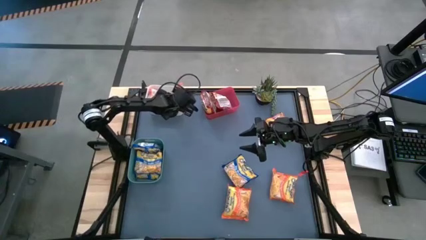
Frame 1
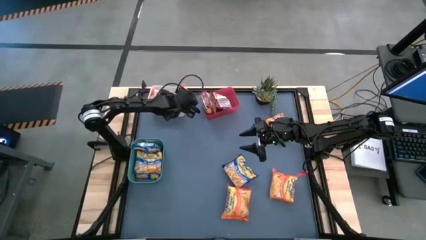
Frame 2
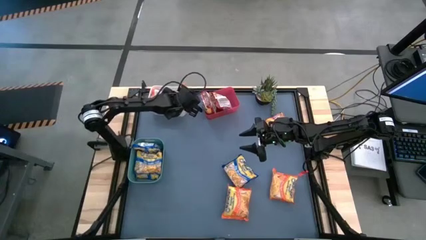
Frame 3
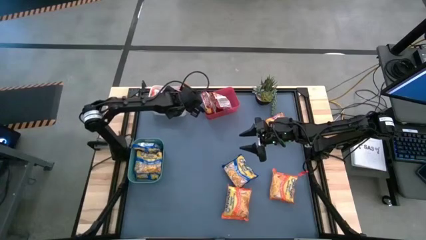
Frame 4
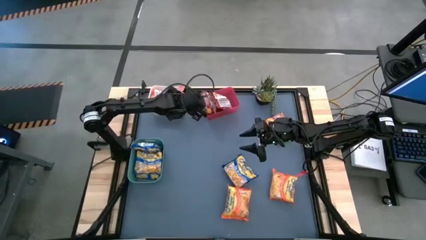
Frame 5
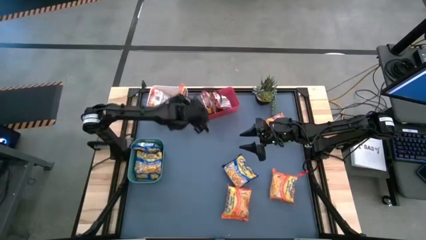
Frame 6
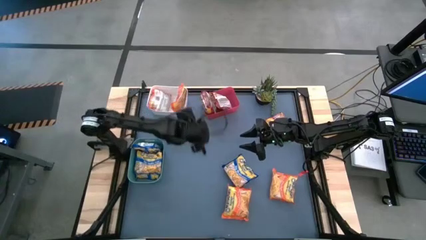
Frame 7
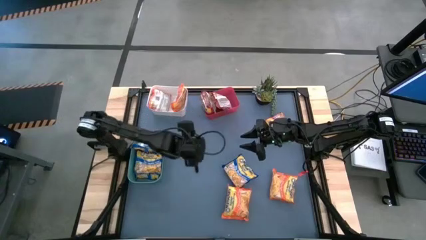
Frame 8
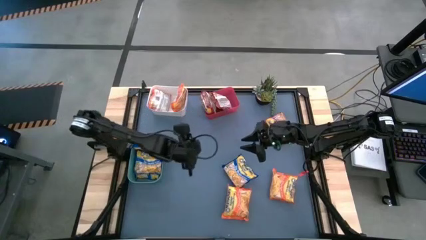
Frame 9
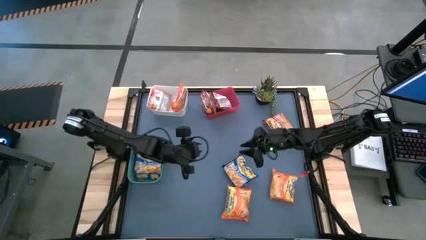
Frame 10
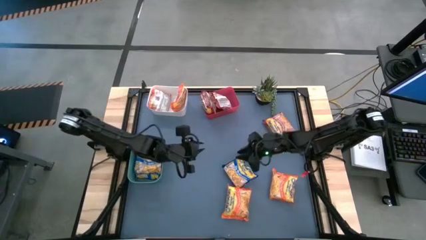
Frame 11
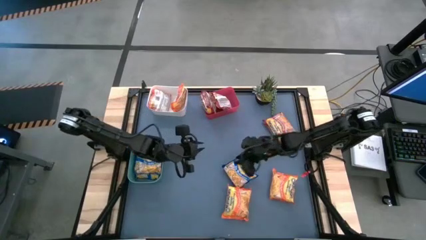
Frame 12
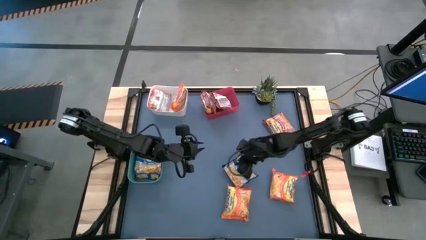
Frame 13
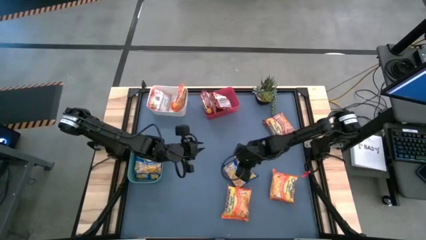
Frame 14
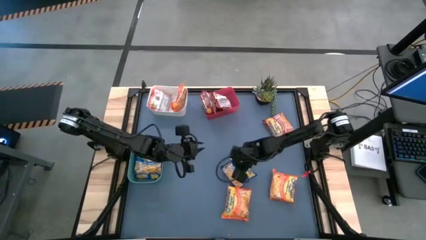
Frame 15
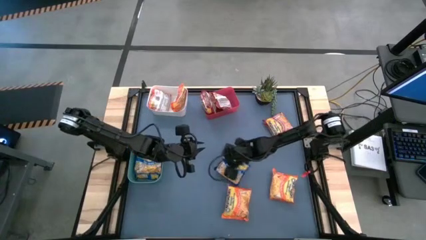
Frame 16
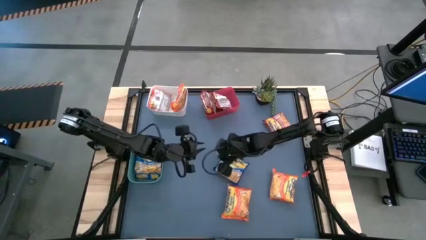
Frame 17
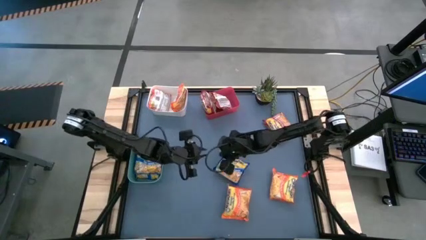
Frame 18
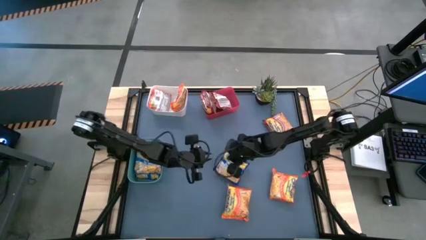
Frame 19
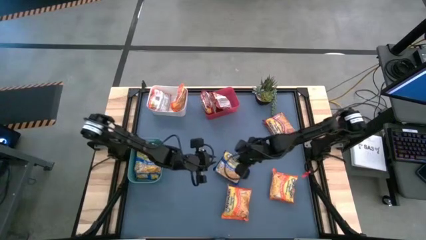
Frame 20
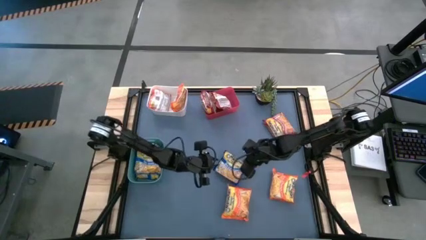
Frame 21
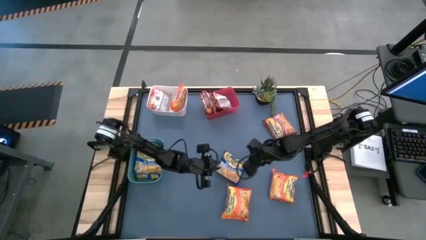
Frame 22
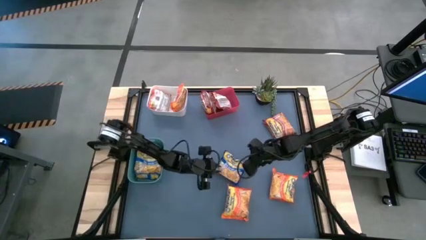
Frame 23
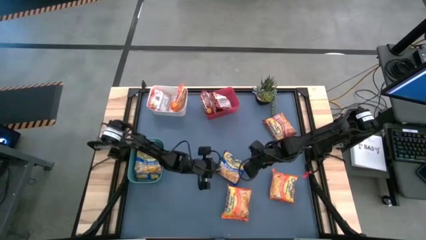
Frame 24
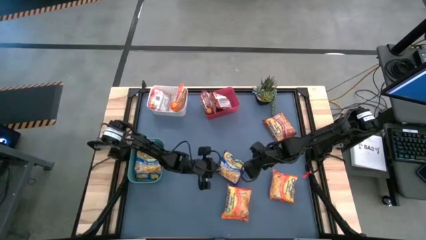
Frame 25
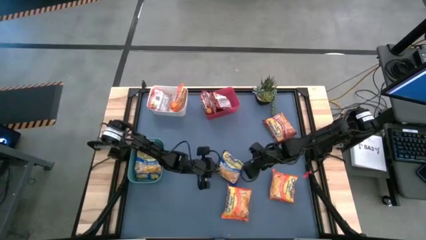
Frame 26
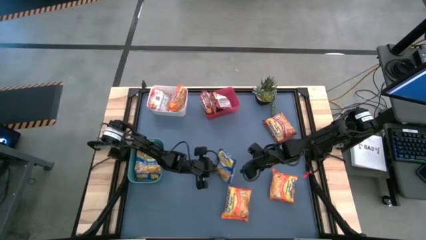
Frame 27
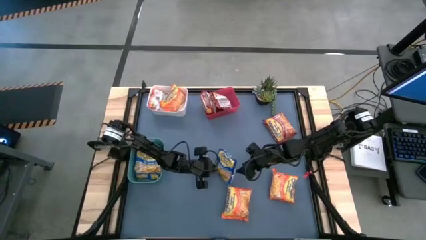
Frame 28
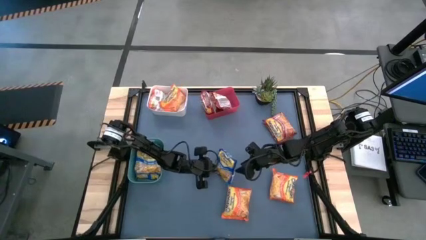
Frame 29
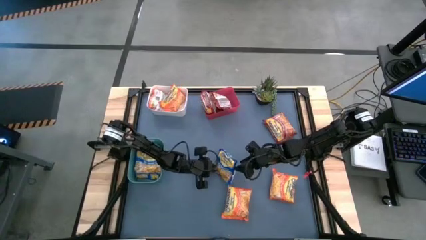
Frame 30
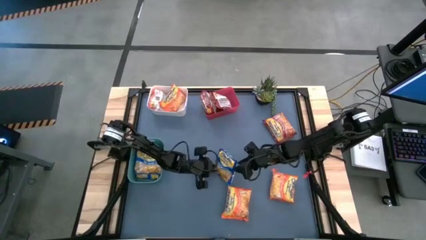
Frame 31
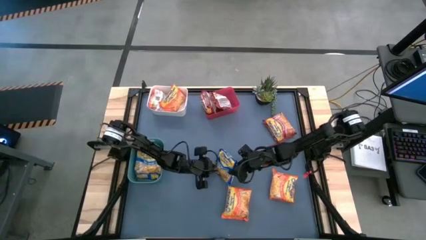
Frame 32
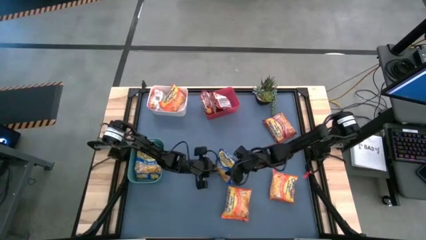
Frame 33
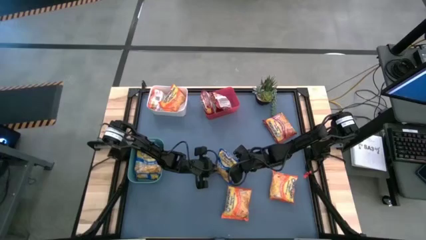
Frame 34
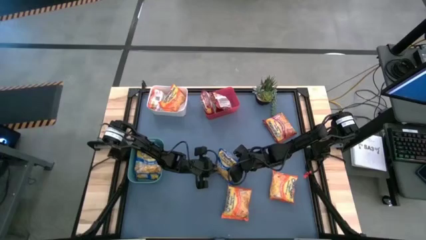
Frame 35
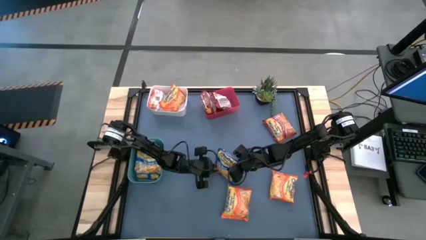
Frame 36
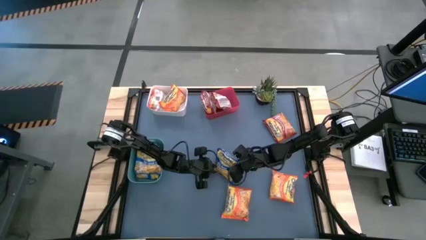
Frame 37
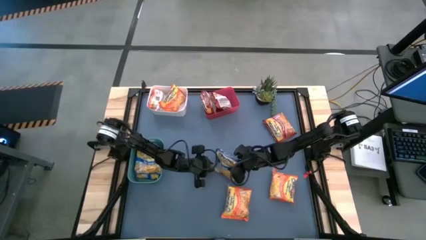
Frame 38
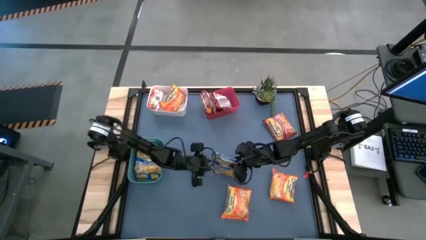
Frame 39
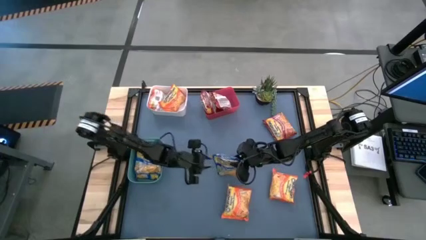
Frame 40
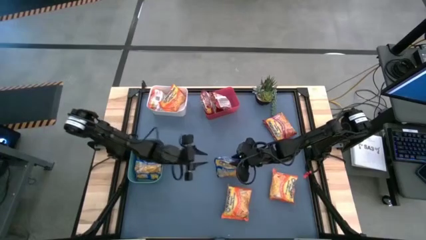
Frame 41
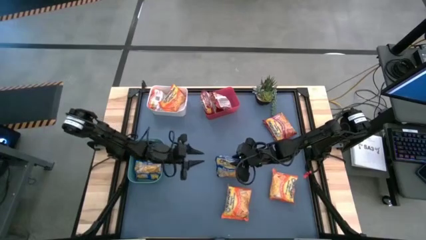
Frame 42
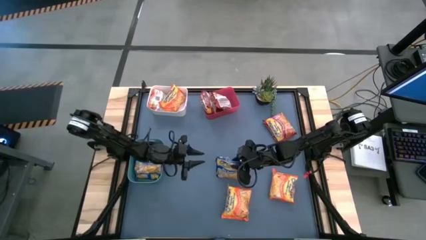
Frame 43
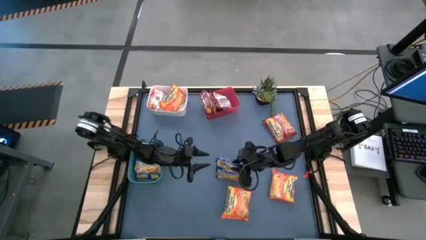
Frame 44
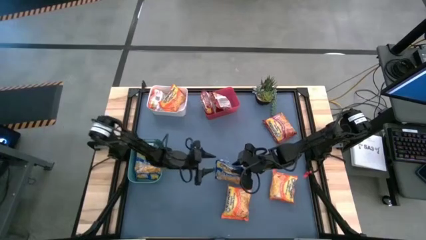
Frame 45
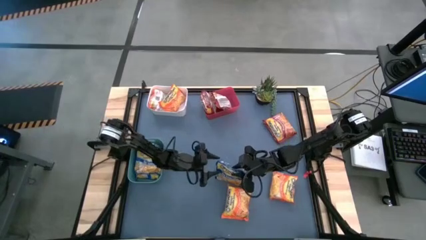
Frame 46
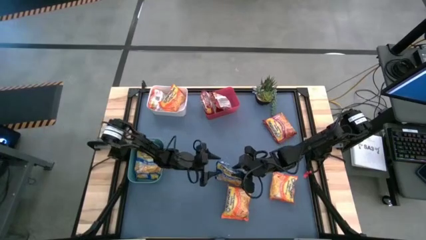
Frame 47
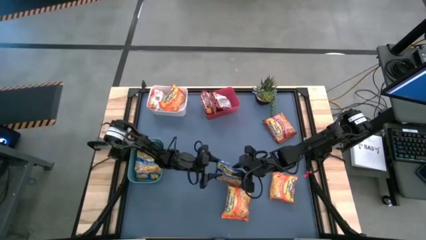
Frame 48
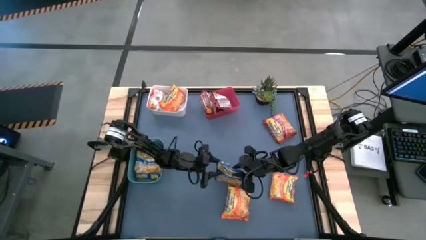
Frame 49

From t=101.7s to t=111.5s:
Task: Sort Maruchan noodles
Put the blue noodle pack into the green bin

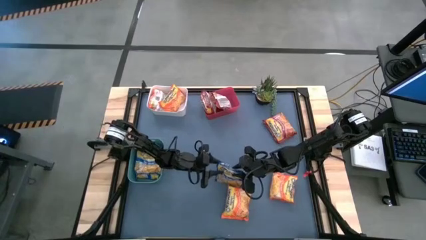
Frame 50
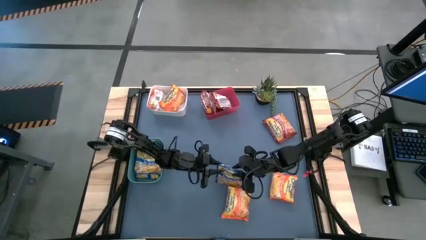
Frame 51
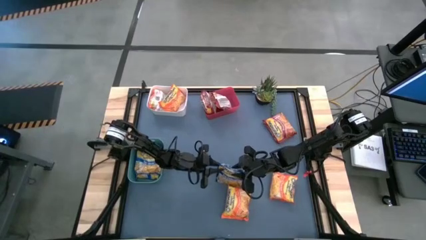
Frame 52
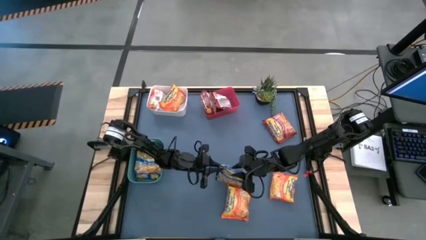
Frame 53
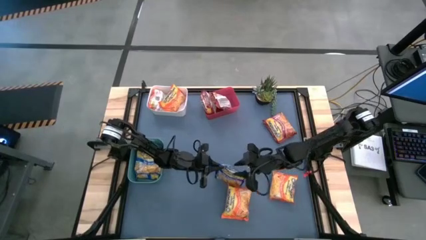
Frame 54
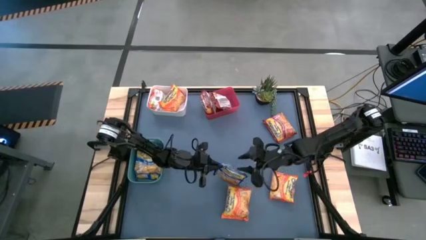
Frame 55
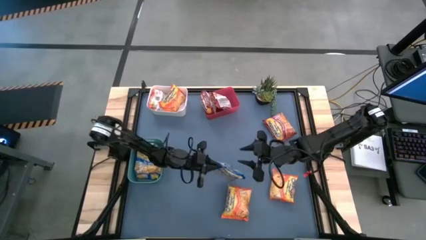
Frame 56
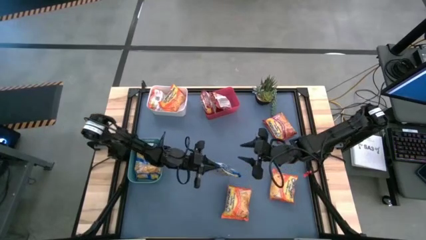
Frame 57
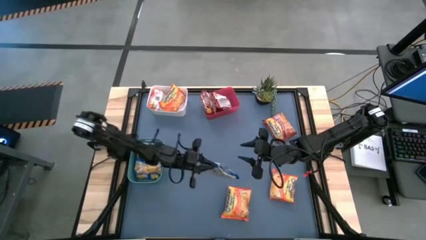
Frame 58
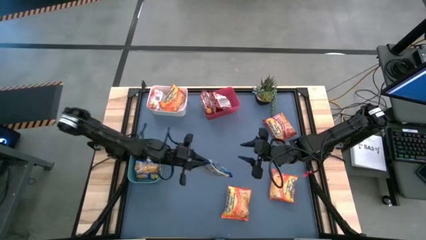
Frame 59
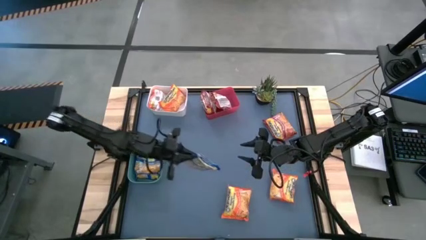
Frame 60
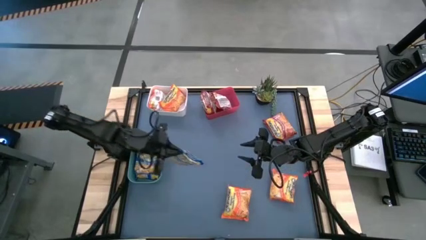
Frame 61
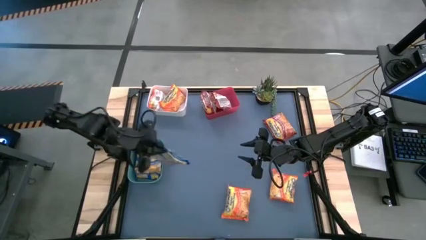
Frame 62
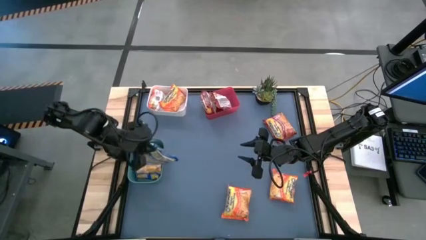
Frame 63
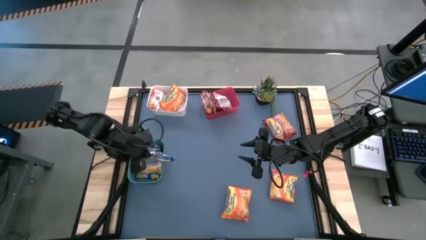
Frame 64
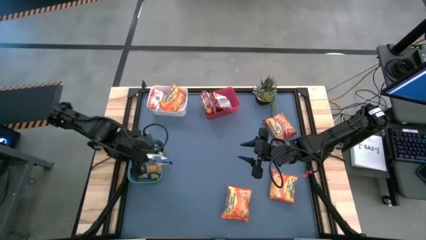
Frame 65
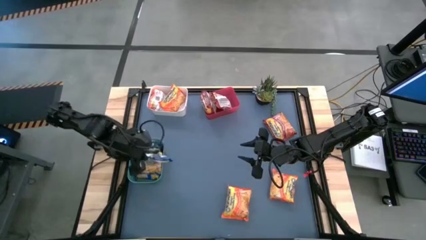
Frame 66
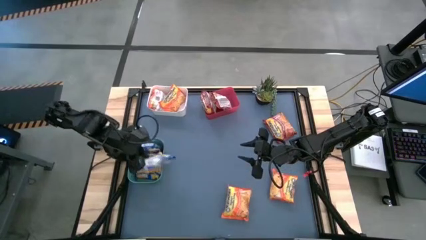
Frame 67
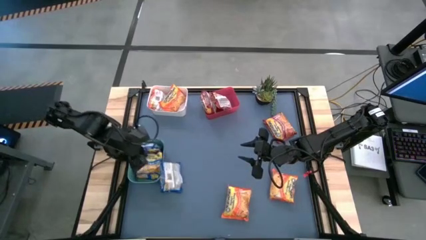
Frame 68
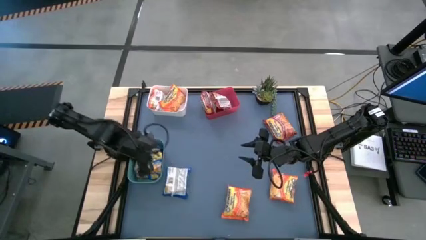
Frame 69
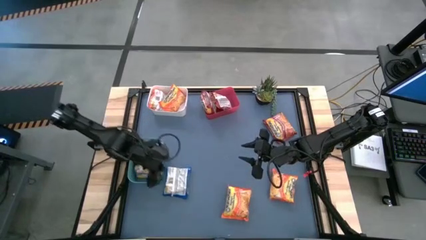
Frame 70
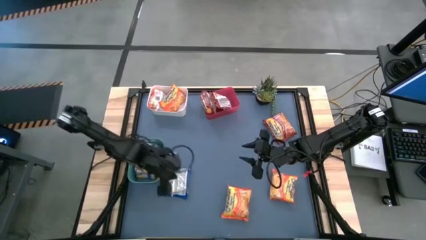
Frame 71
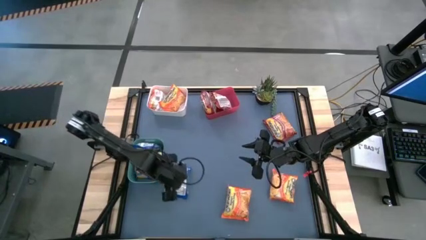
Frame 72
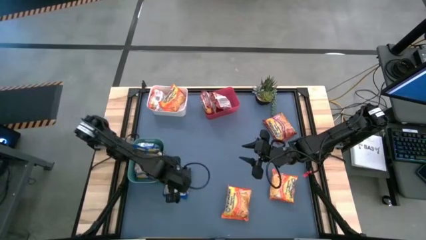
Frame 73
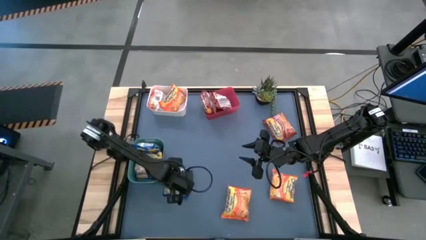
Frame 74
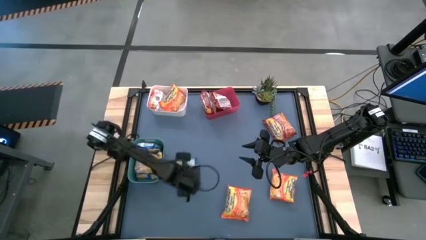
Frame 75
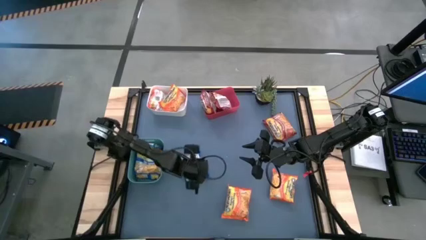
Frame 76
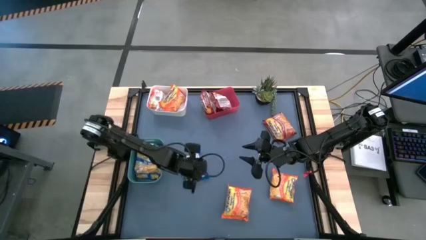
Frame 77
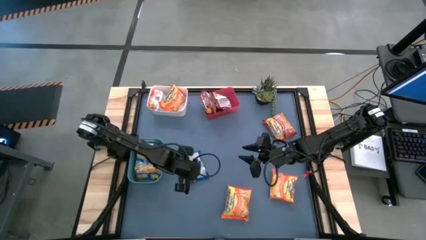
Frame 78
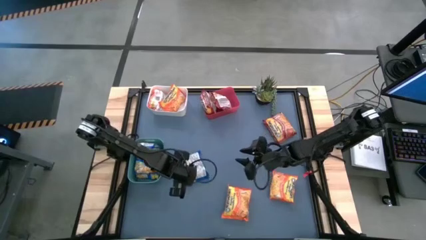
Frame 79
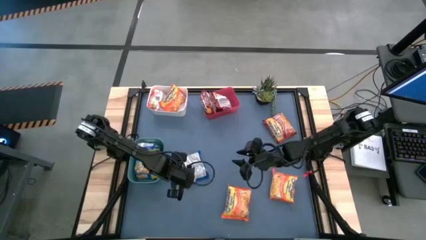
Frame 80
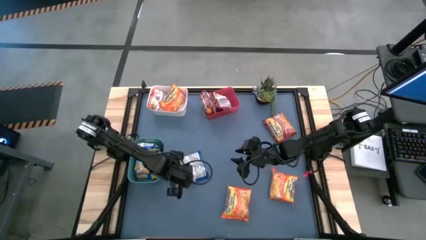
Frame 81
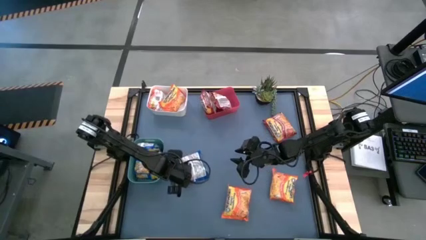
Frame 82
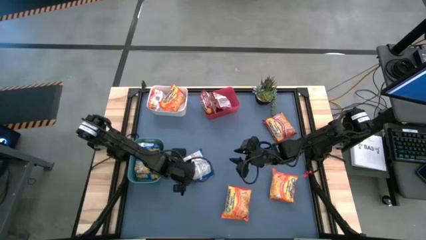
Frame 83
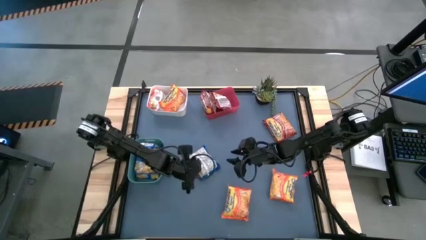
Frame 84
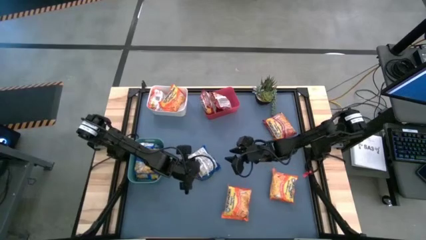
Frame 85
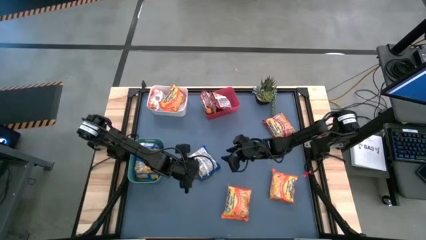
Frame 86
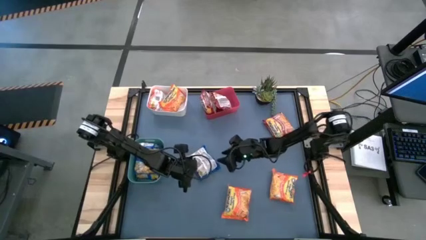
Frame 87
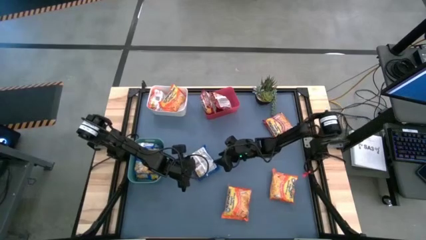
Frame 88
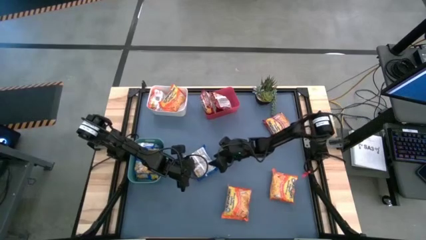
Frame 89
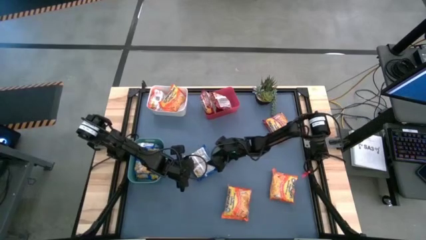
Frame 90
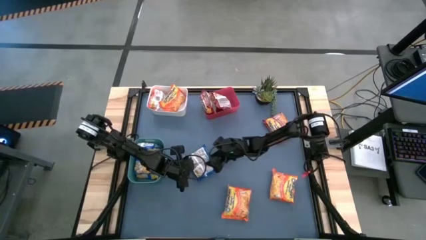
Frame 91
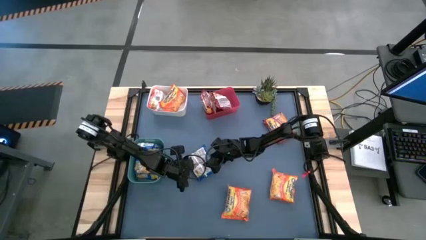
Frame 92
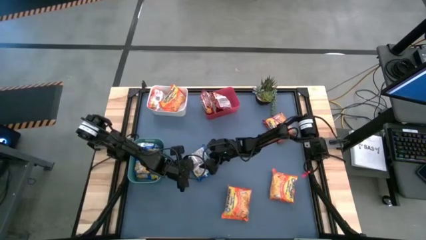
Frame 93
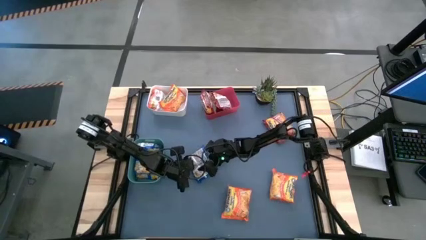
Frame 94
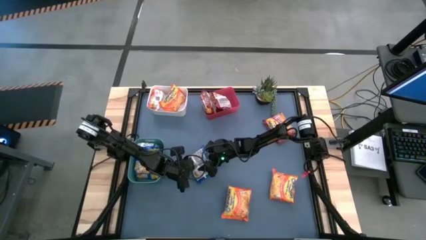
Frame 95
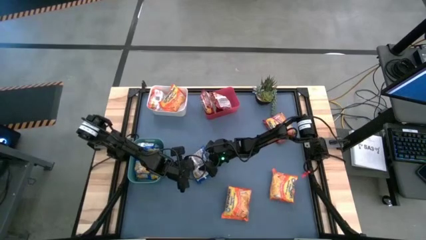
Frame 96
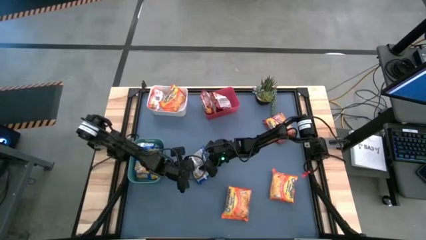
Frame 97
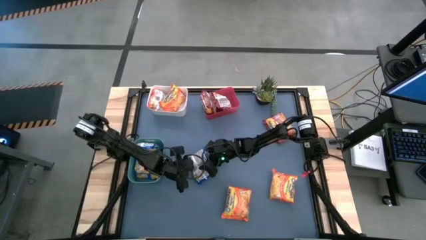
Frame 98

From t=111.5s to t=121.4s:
Put the blue noodle pack into the green bin
